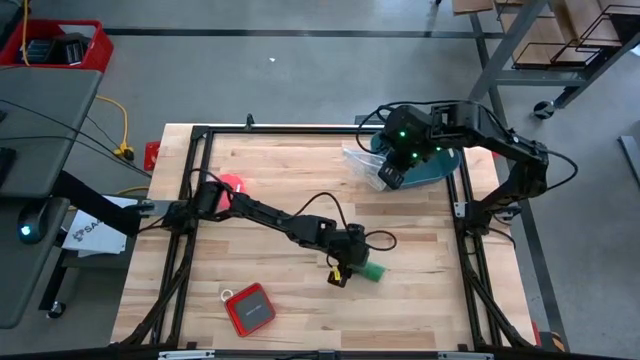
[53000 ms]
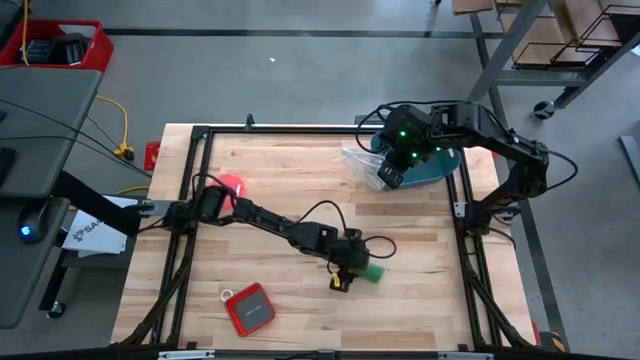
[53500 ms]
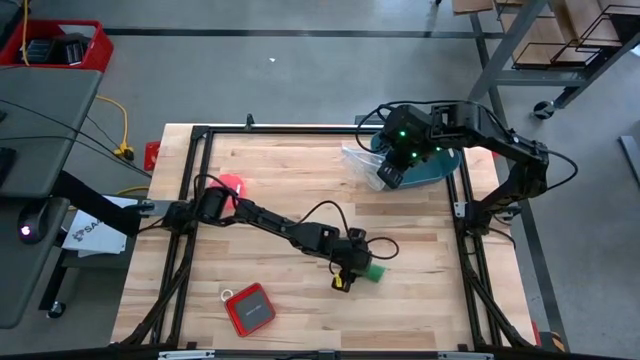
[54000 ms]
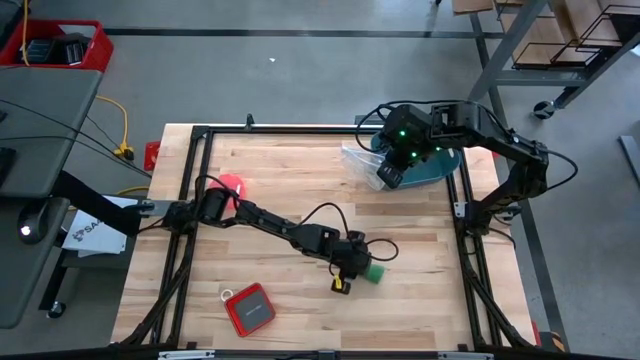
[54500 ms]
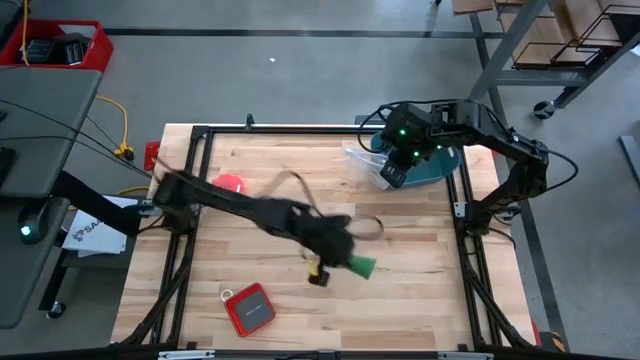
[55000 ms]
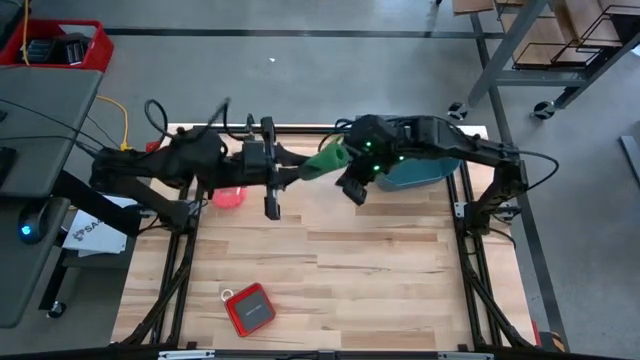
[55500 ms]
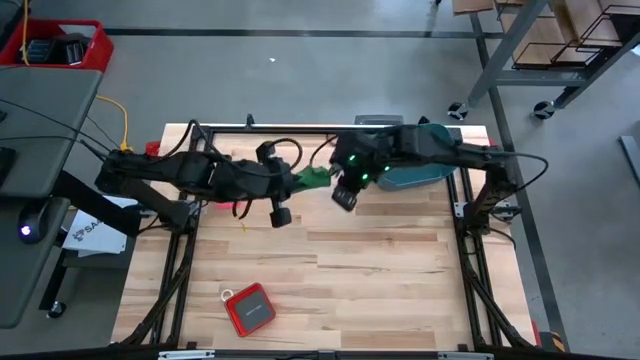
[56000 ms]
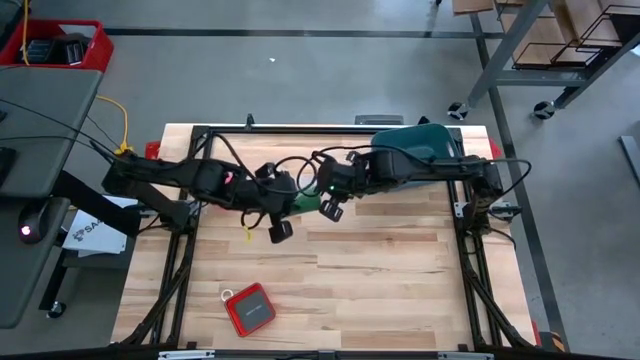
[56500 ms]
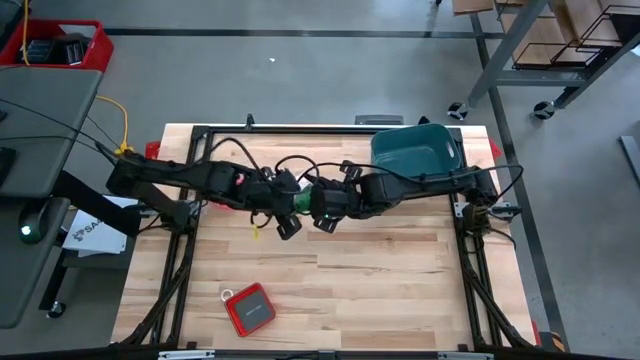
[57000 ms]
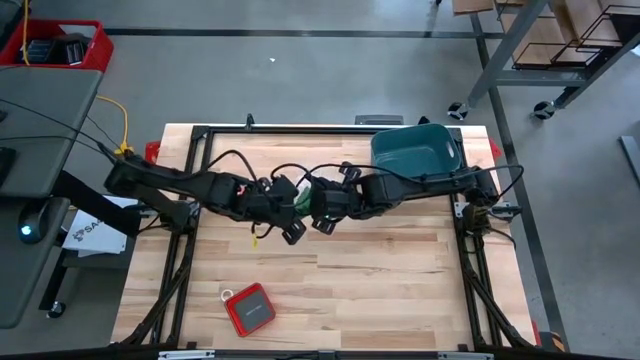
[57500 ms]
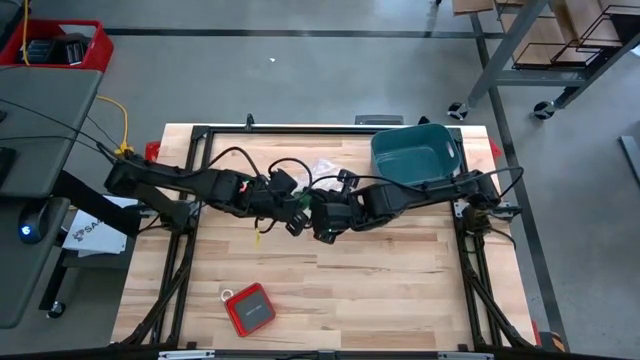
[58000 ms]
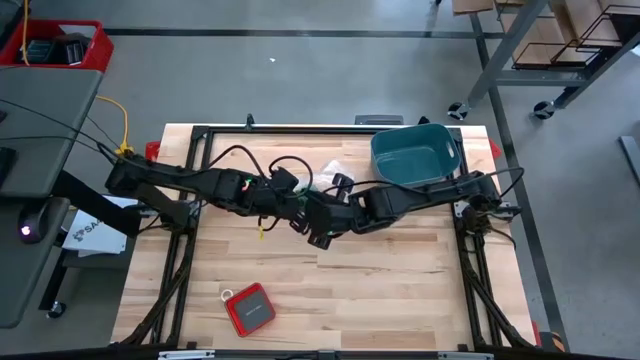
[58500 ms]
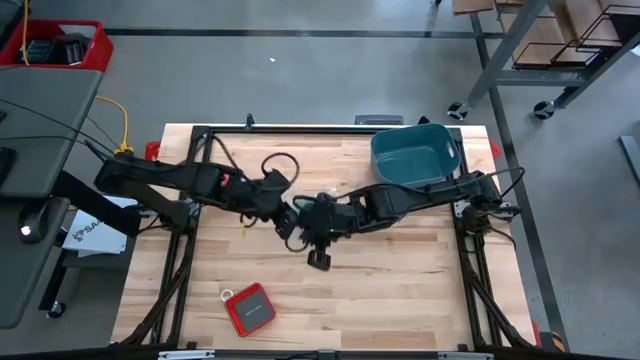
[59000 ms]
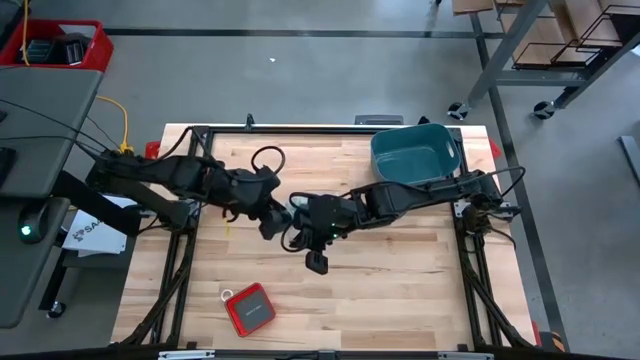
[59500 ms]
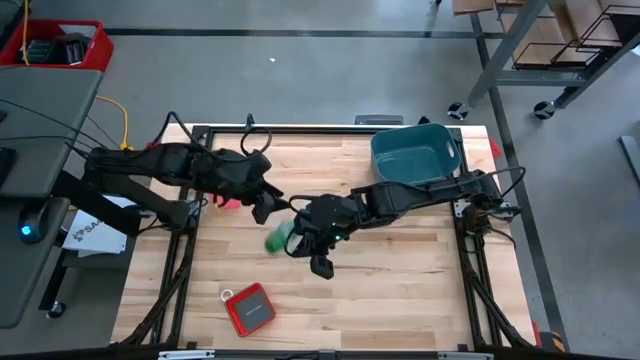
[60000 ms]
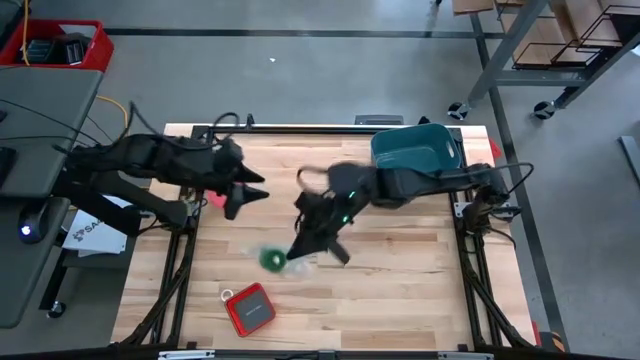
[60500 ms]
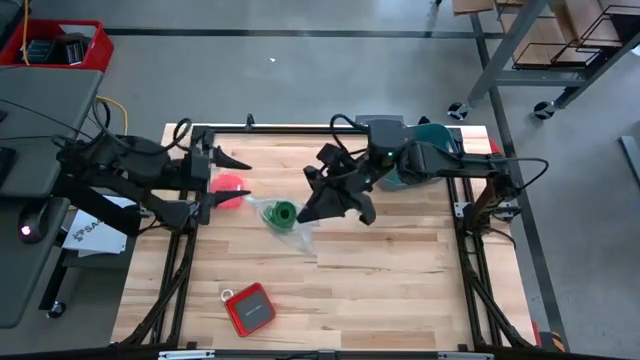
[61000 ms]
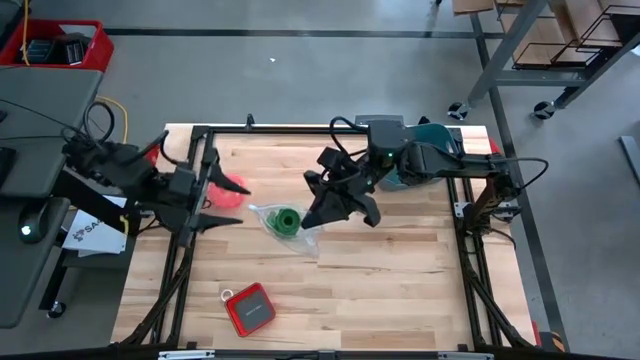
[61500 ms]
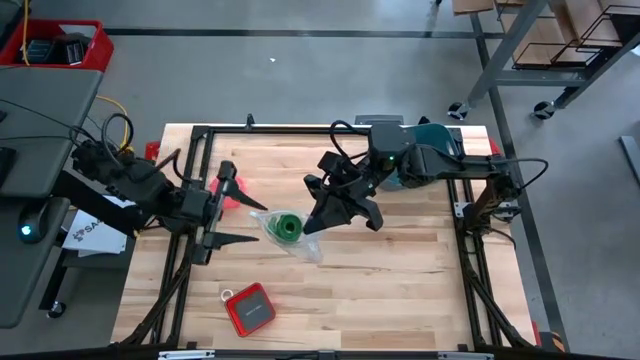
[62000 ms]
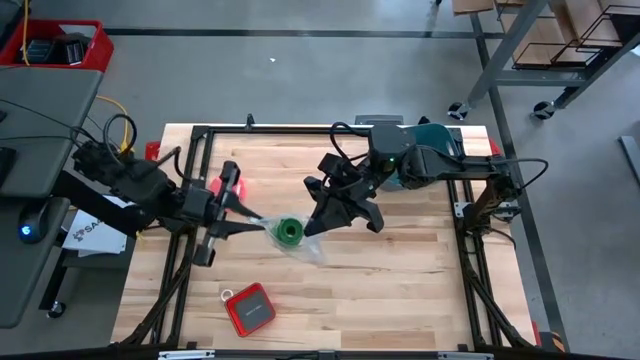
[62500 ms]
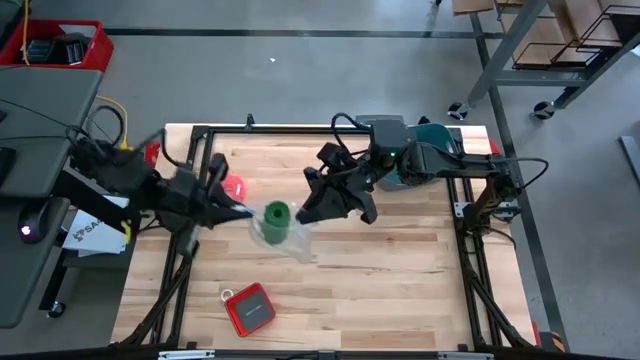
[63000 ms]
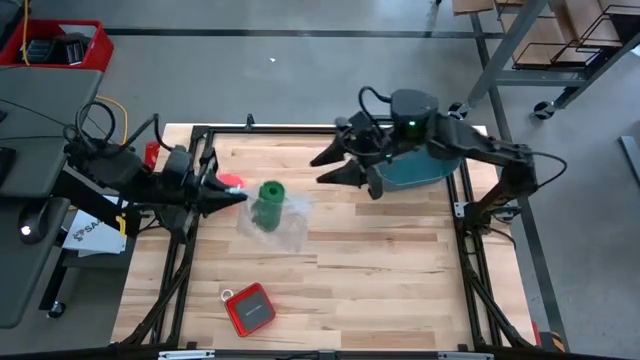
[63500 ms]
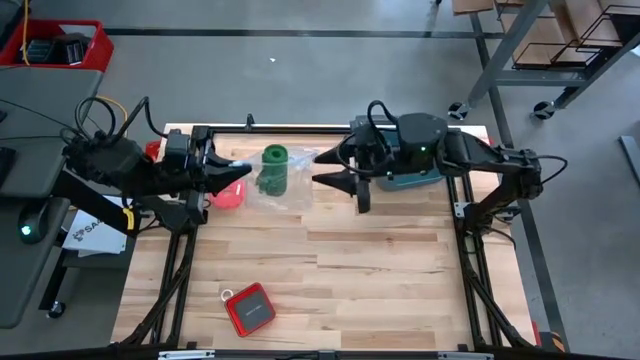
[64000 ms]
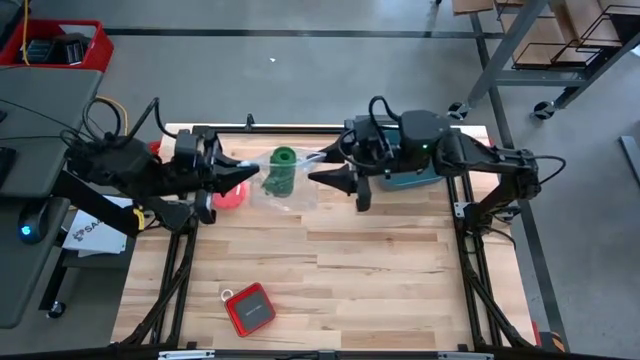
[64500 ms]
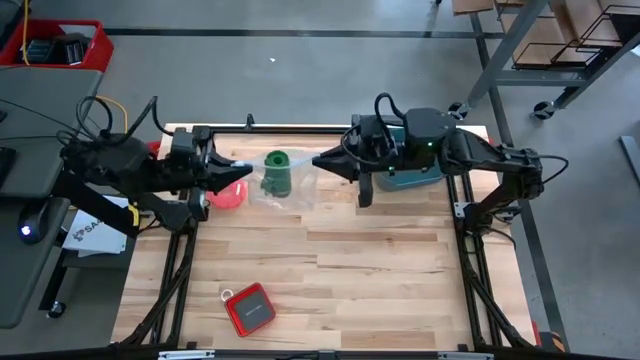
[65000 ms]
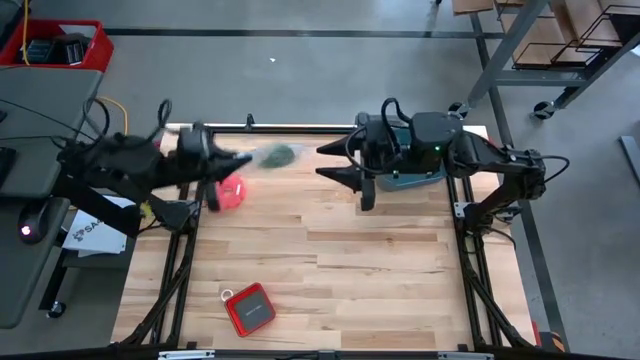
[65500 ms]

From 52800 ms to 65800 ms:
Task: Roll bandage
Put the rolled green bandage into the transparent zip bag

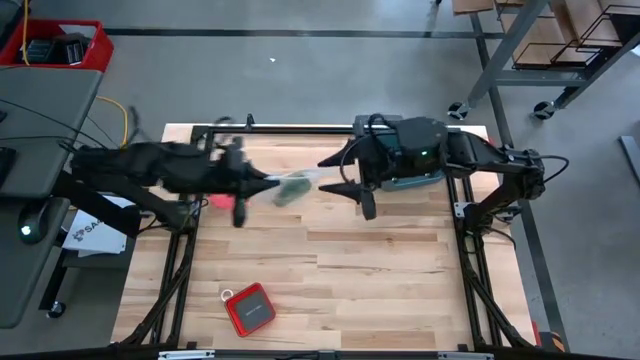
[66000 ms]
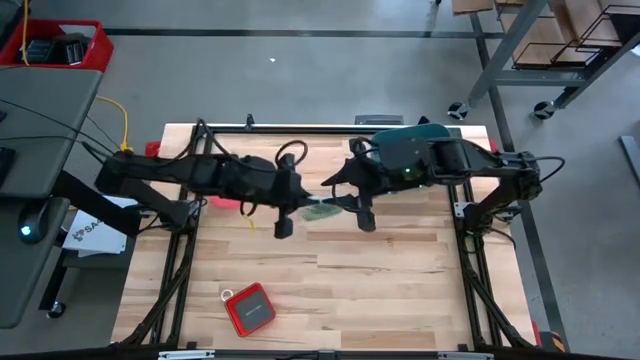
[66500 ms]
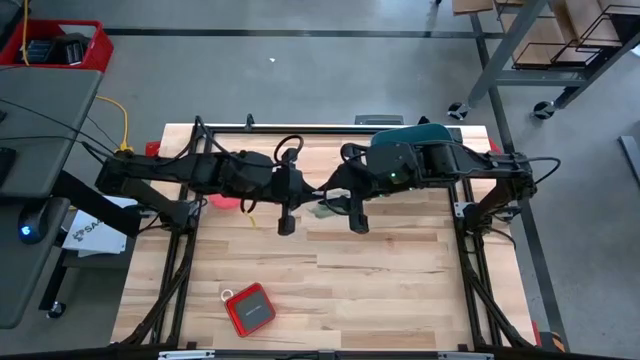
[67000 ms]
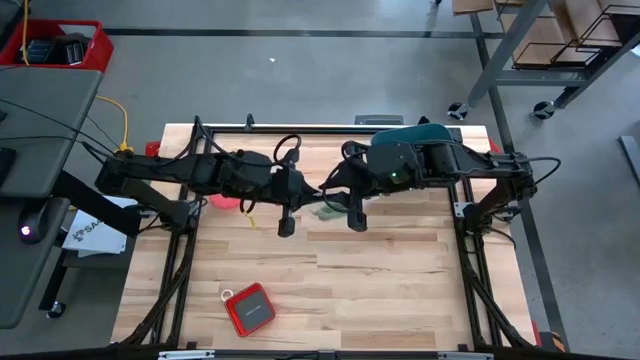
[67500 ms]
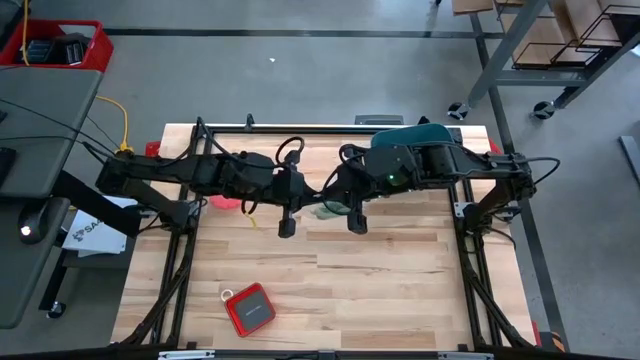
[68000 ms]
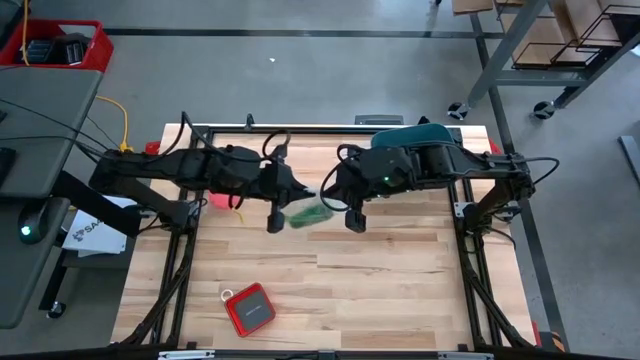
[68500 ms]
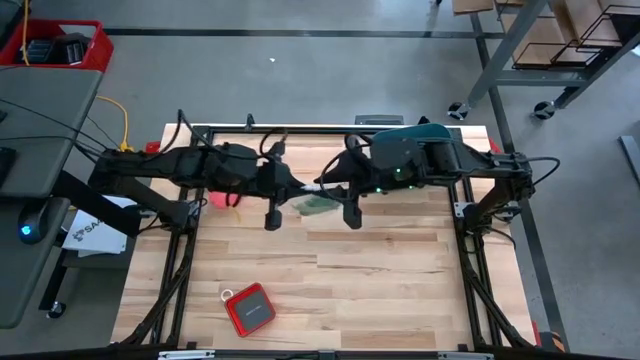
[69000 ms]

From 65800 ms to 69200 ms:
Close the transparent zip bag

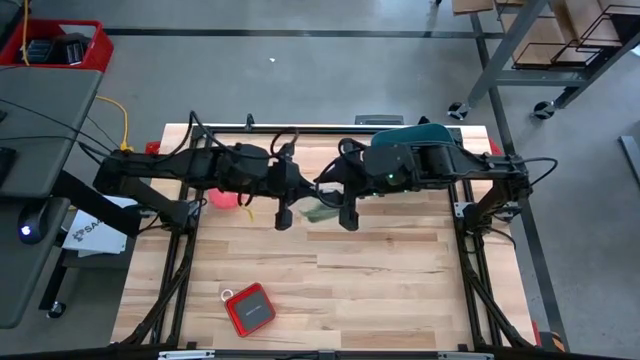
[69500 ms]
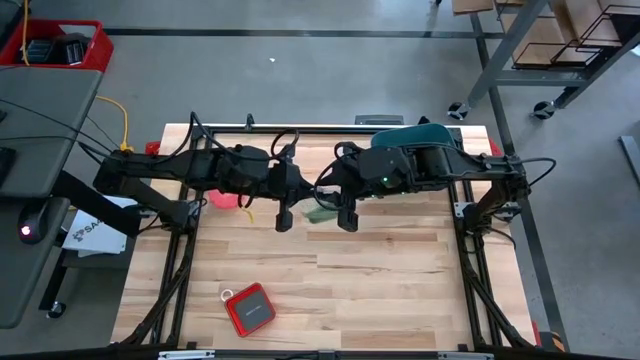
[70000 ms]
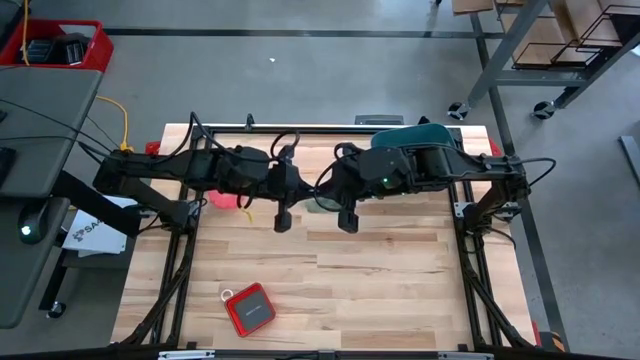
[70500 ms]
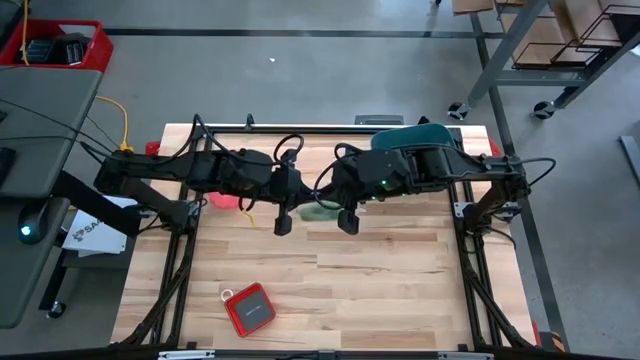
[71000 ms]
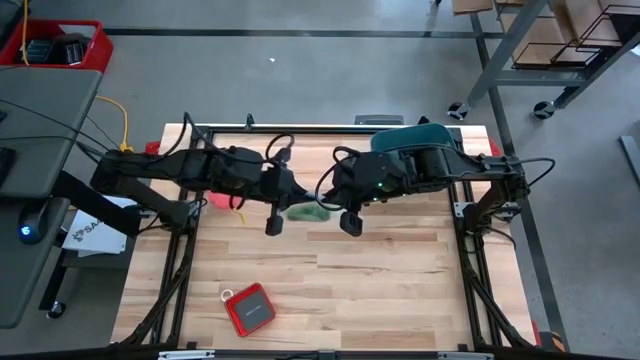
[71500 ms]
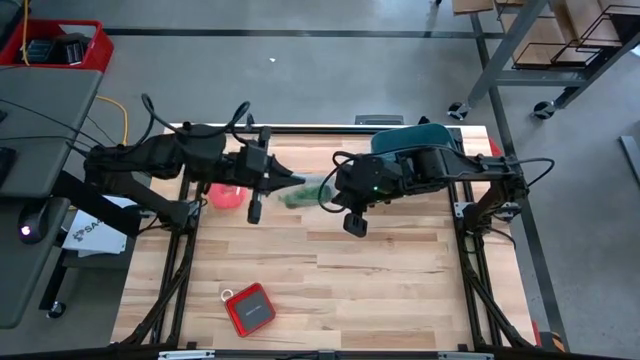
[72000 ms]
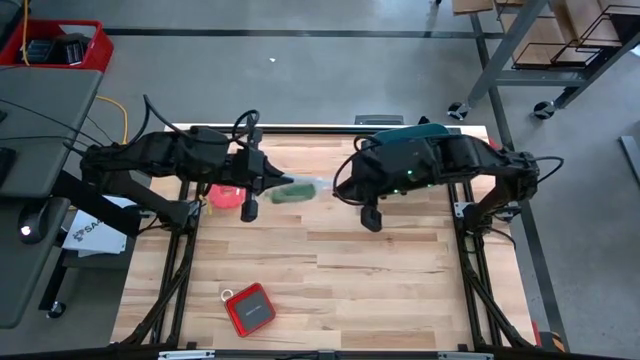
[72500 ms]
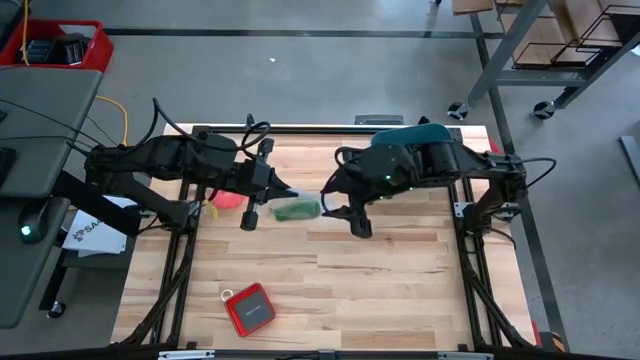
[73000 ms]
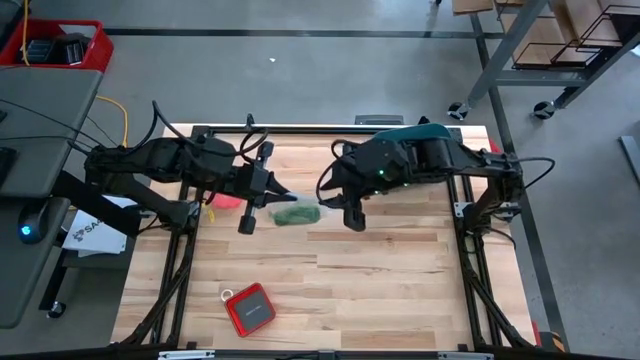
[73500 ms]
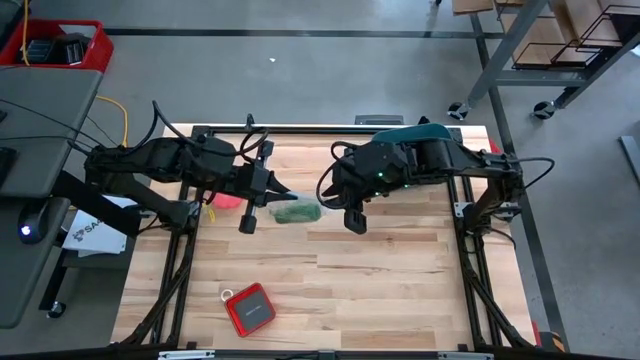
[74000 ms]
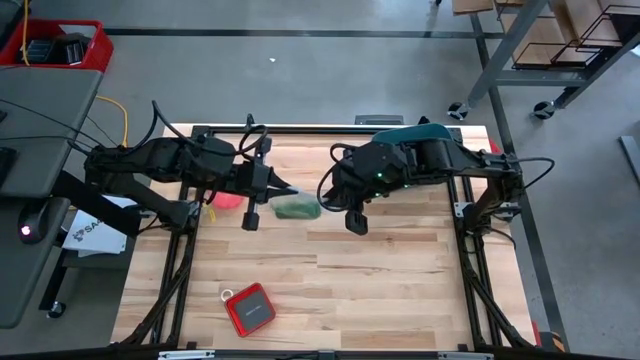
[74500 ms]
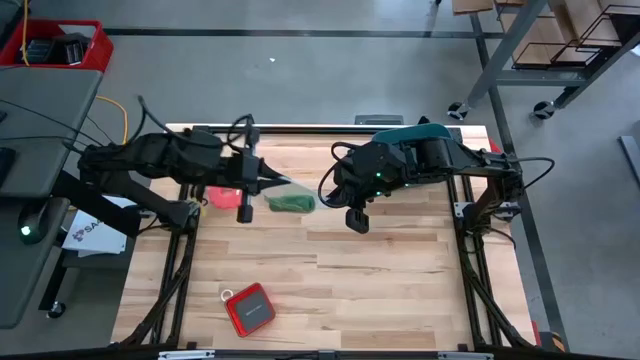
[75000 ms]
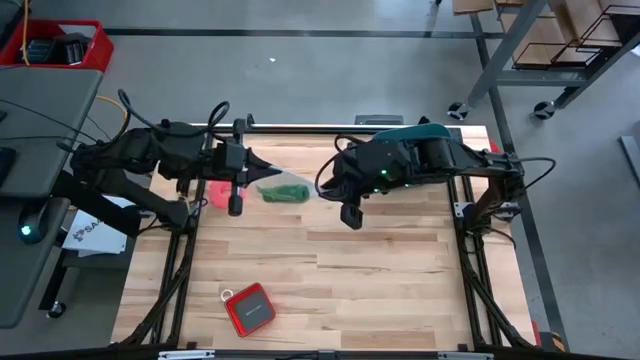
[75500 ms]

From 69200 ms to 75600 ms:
Close the transparent zip bag
